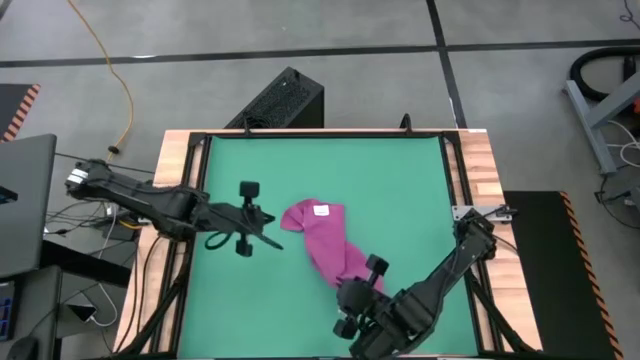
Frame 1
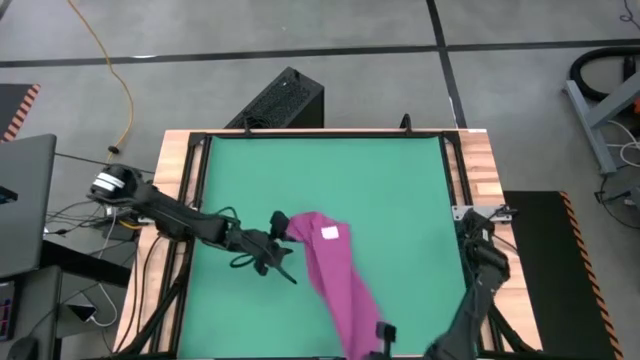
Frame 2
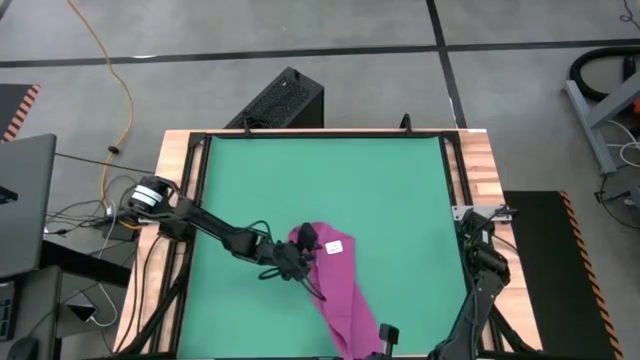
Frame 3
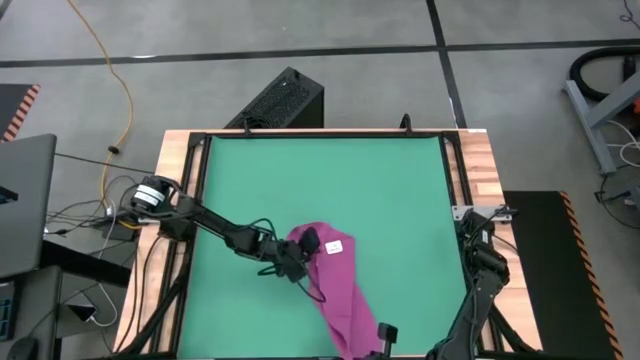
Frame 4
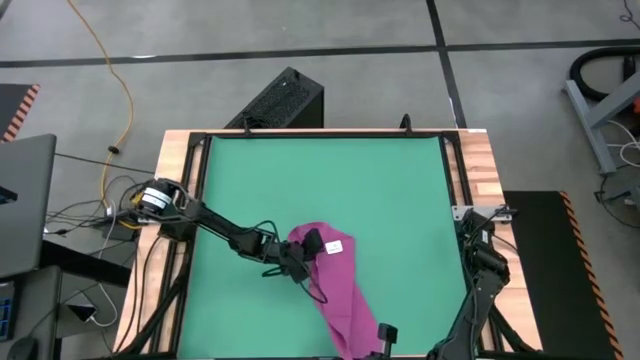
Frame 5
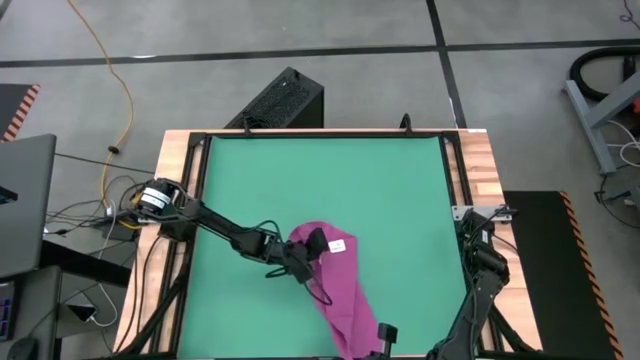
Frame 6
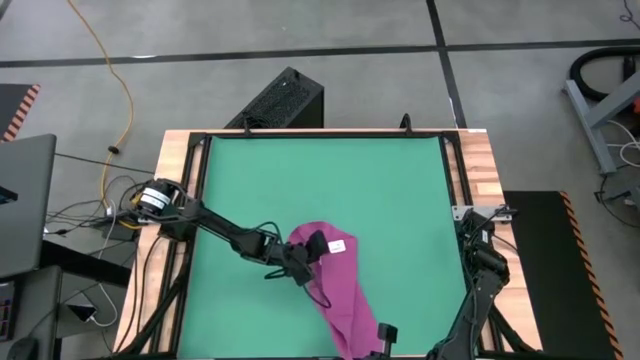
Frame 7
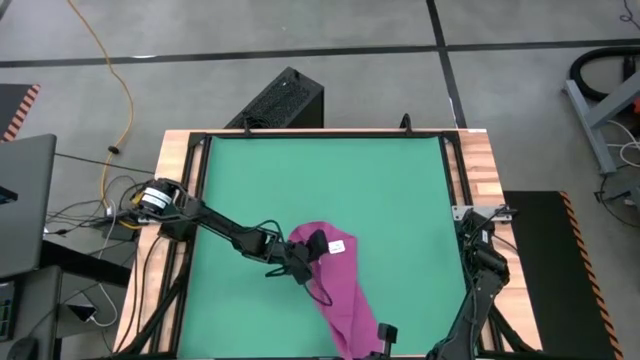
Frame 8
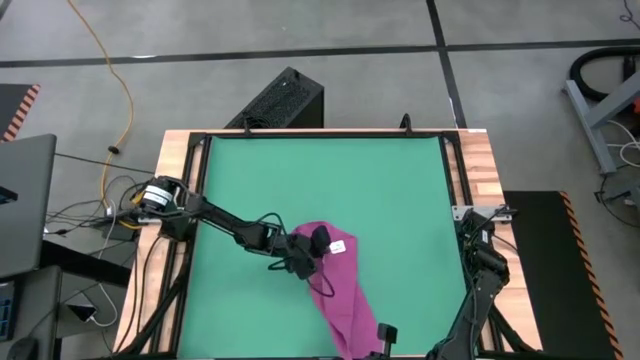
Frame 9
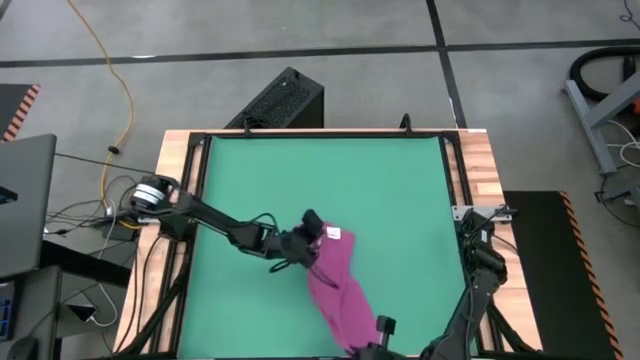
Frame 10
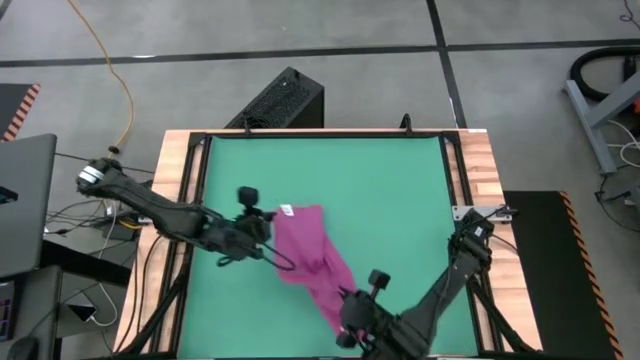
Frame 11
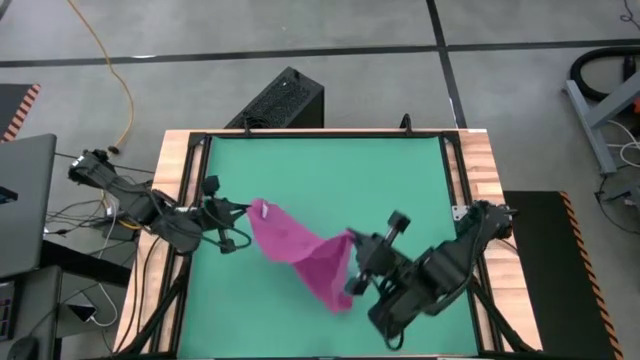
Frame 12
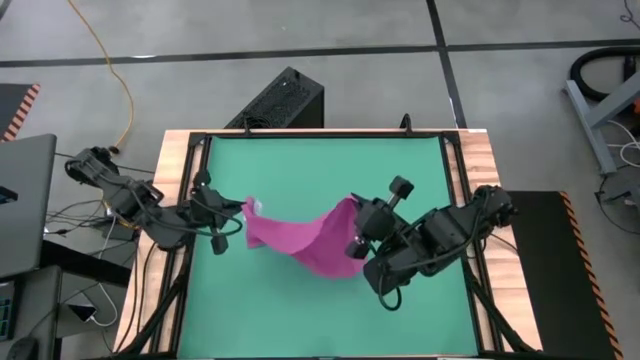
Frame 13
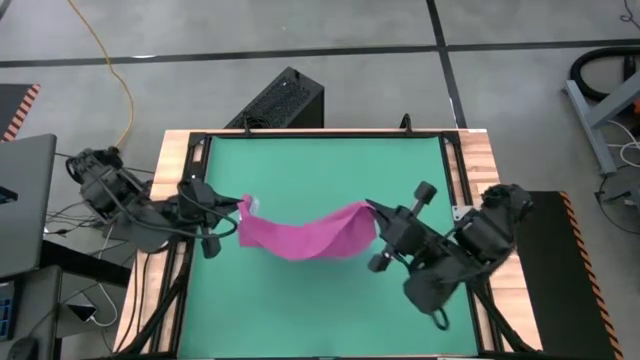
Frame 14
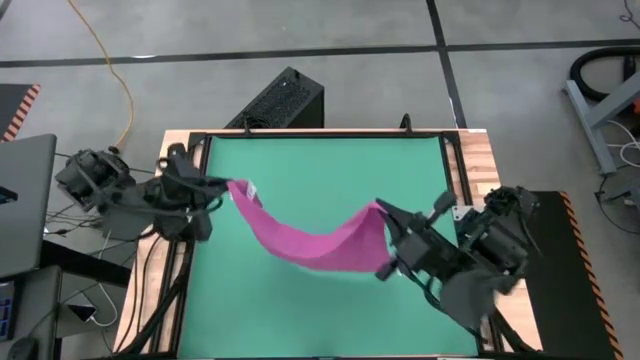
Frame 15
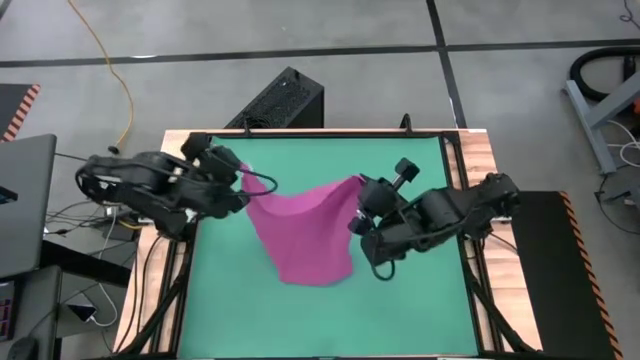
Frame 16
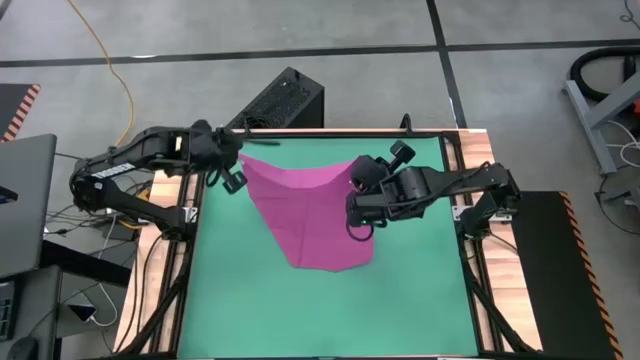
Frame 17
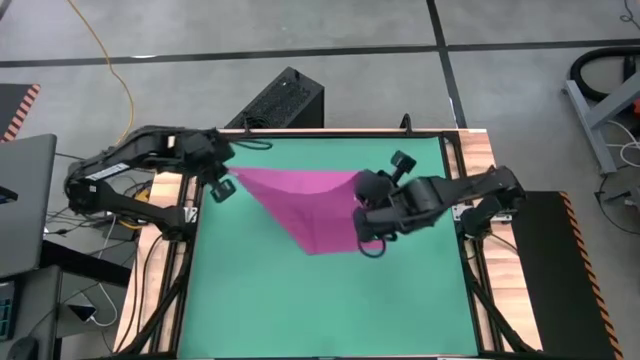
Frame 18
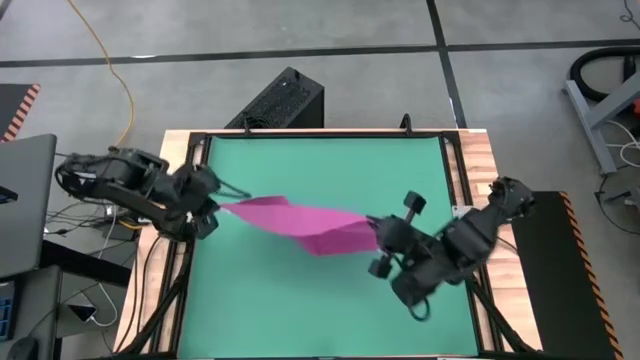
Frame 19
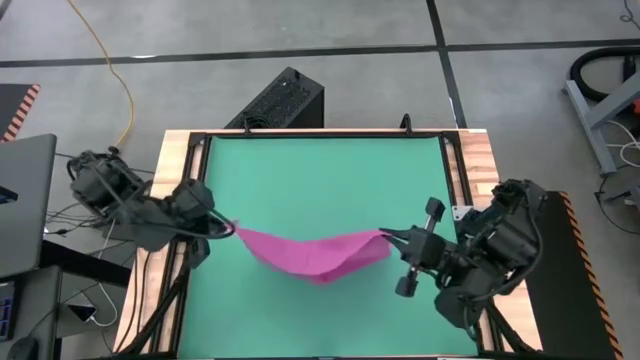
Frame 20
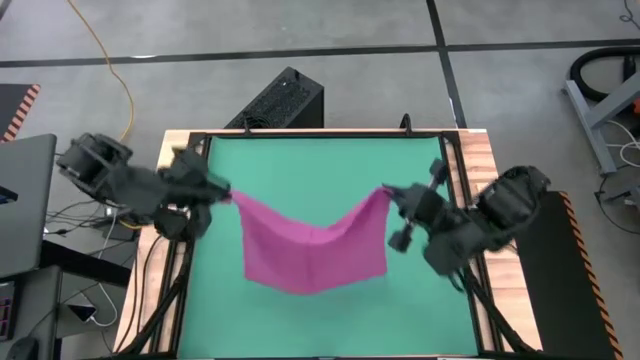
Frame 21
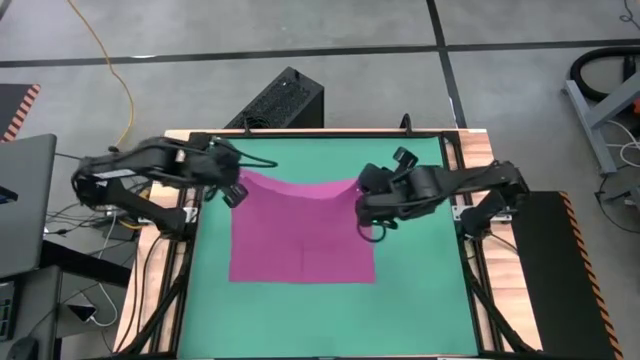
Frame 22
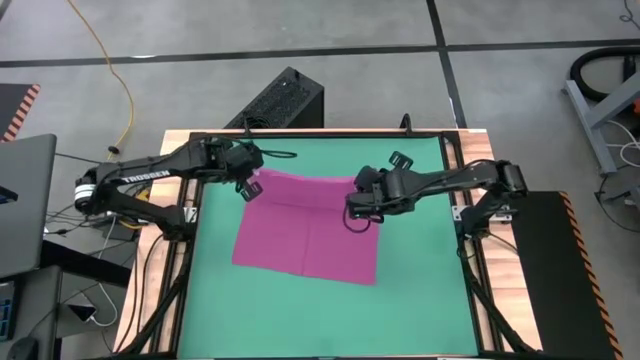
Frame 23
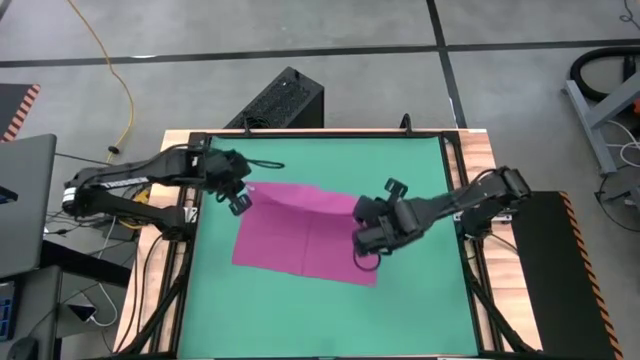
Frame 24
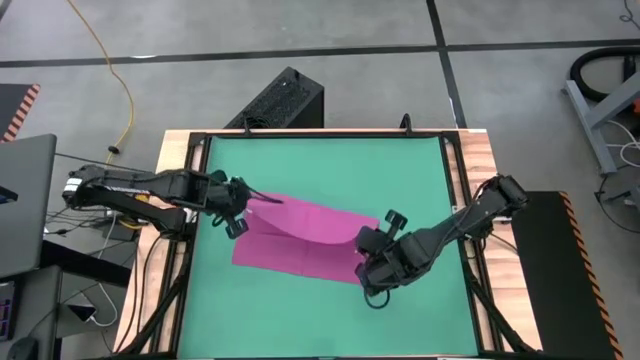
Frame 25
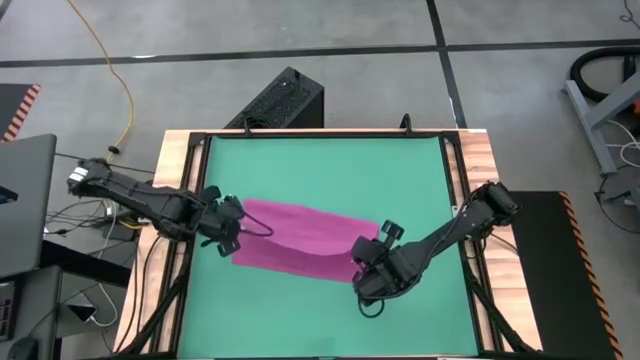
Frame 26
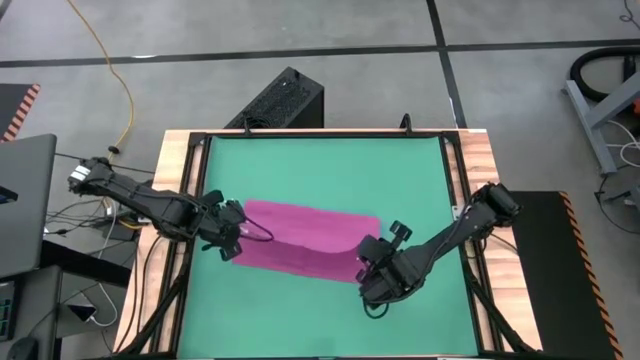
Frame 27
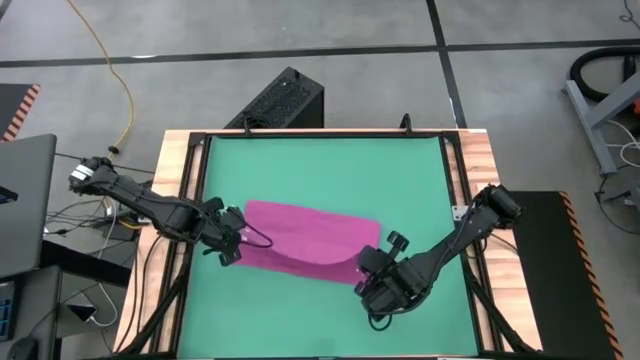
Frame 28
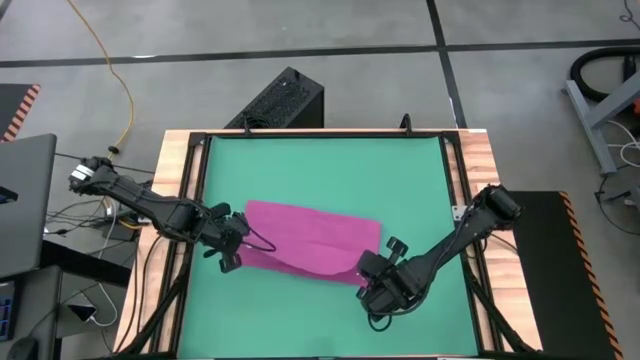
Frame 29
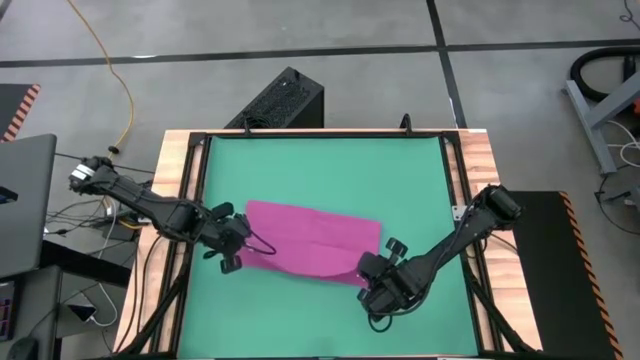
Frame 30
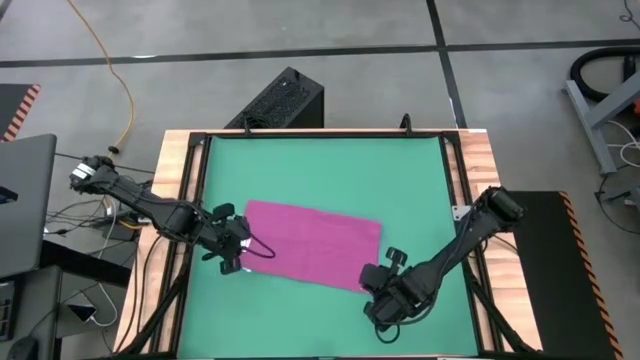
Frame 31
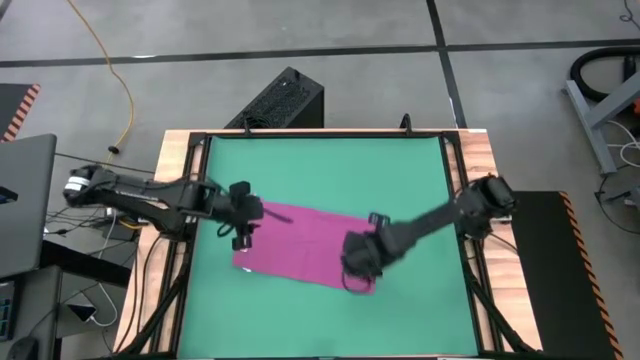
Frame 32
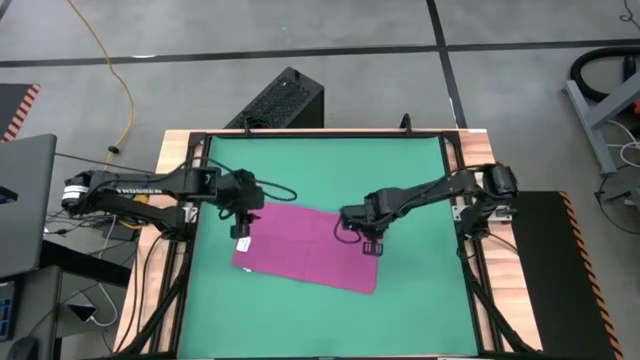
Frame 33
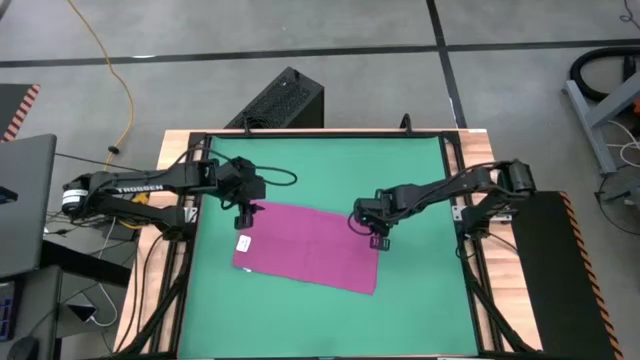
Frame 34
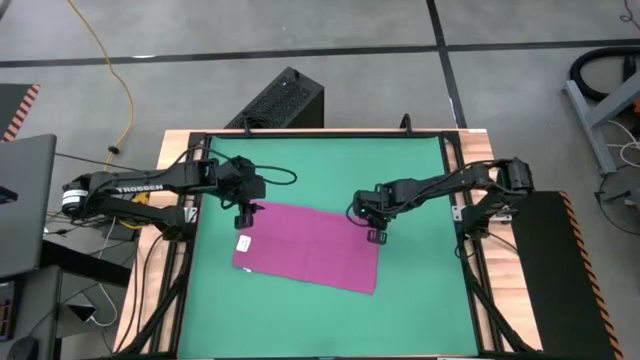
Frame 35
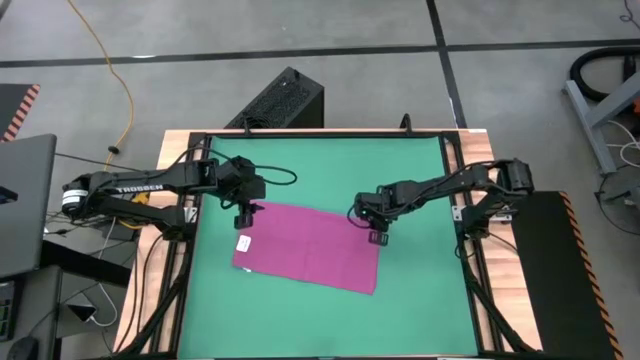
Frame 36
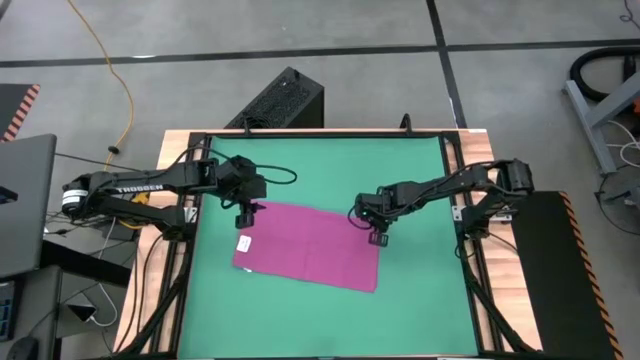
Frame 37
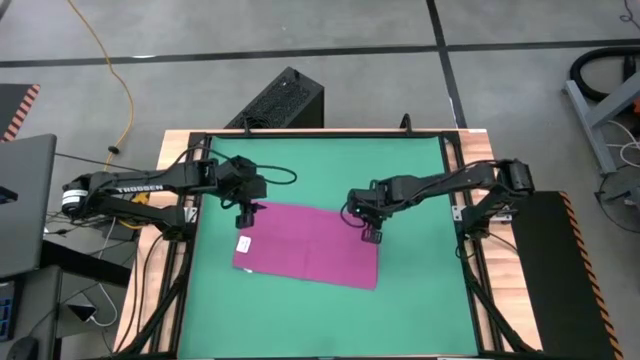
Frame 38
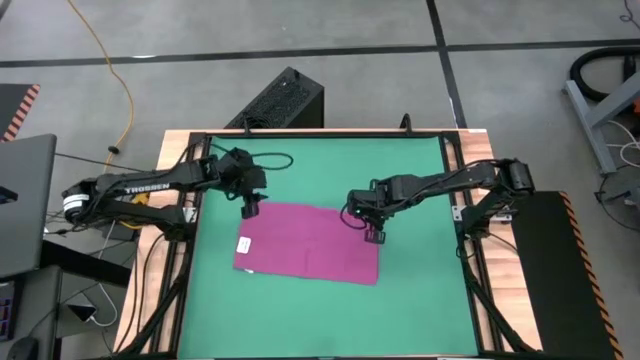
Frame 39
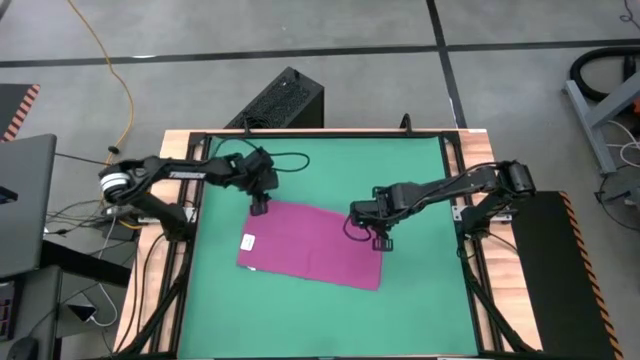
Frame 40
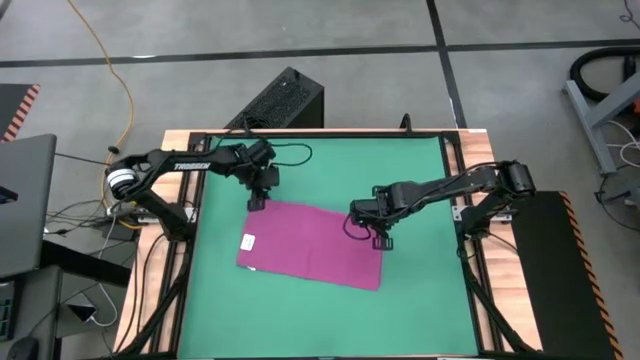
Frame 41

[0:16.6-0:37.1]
Task: Roll towel
Roll the pink towel
